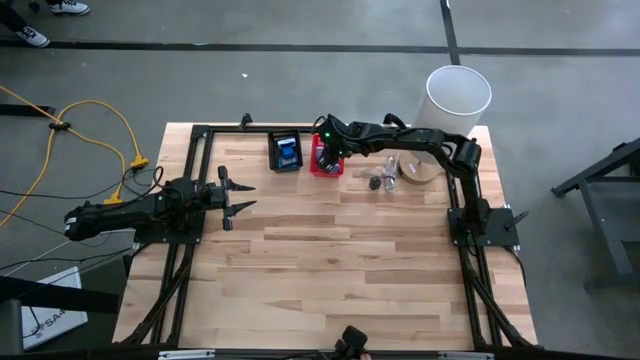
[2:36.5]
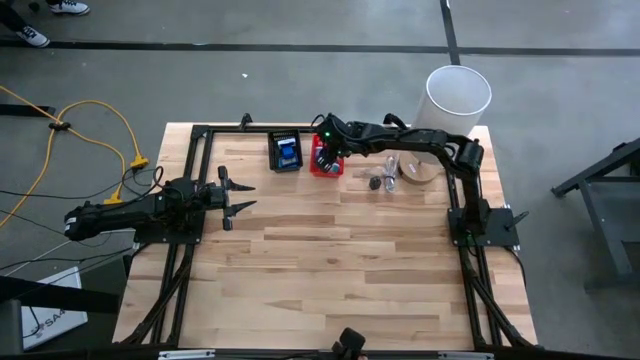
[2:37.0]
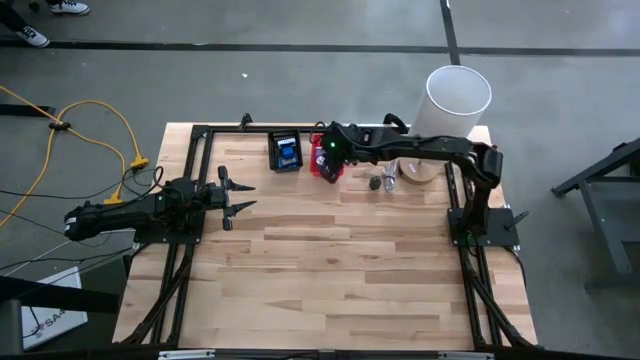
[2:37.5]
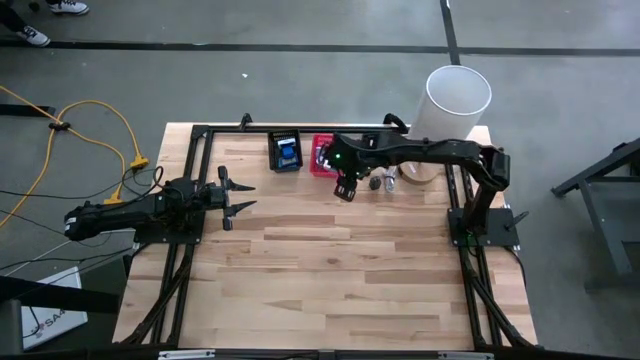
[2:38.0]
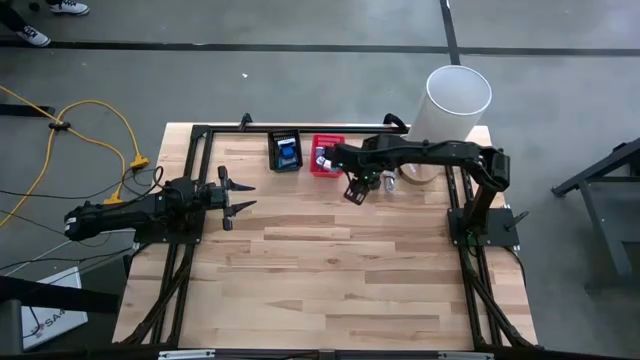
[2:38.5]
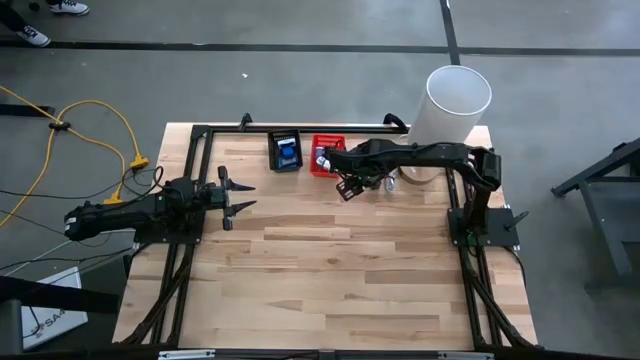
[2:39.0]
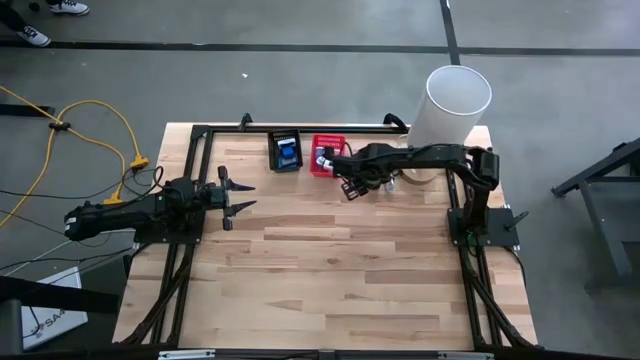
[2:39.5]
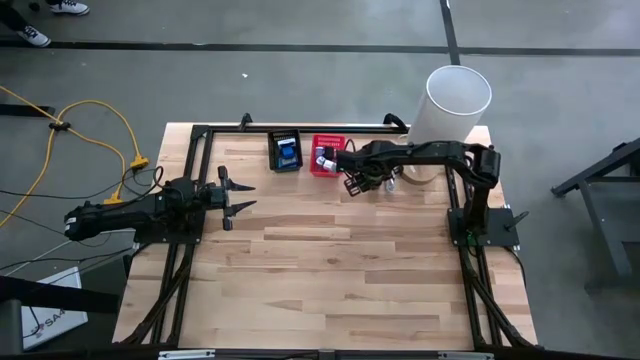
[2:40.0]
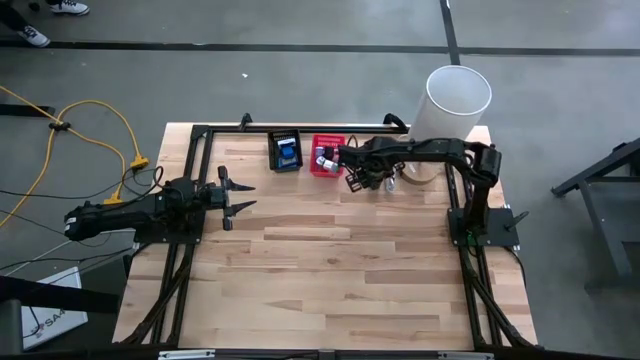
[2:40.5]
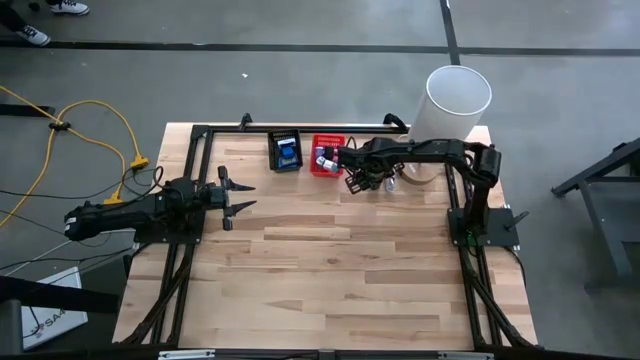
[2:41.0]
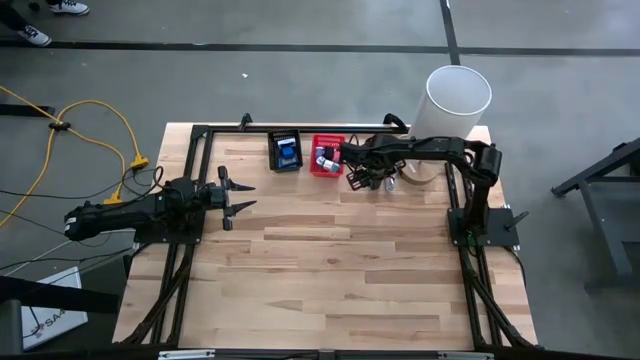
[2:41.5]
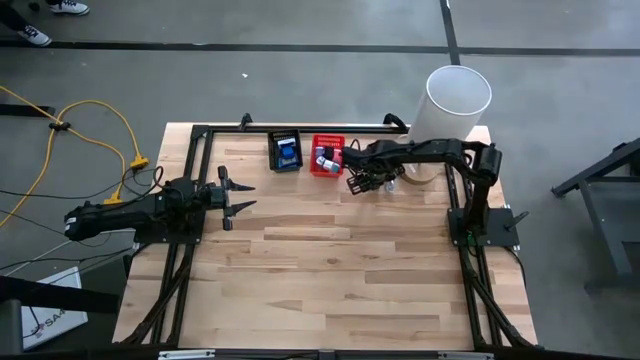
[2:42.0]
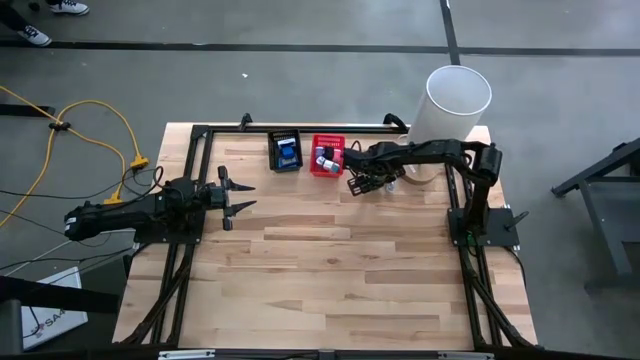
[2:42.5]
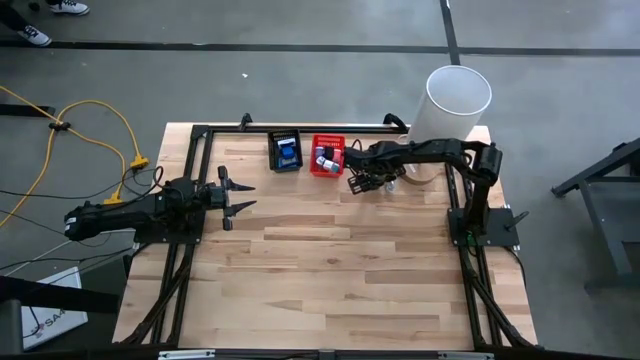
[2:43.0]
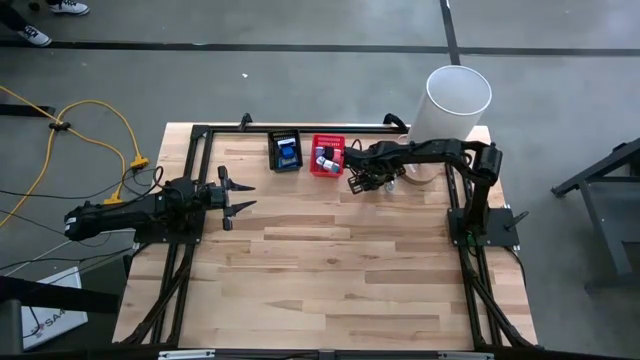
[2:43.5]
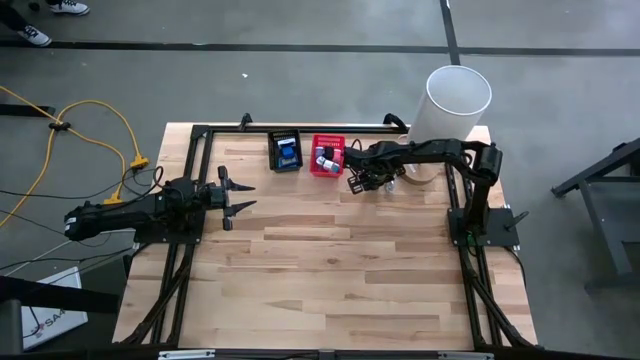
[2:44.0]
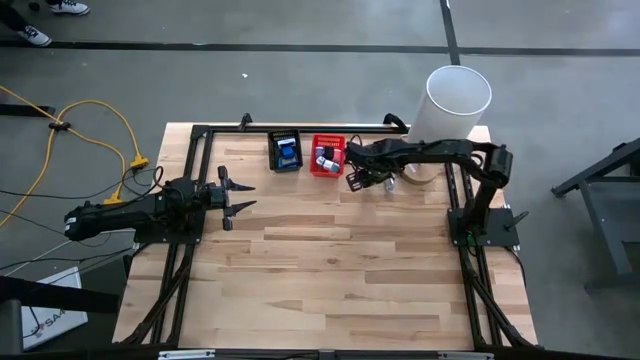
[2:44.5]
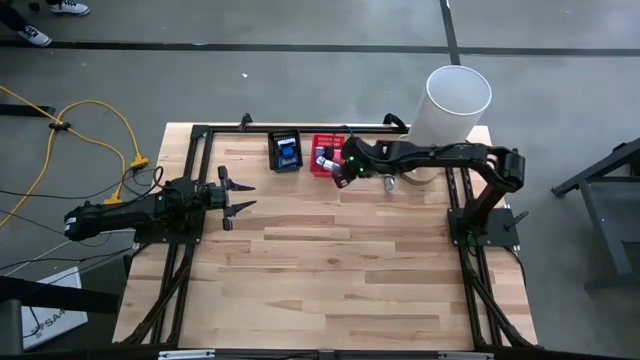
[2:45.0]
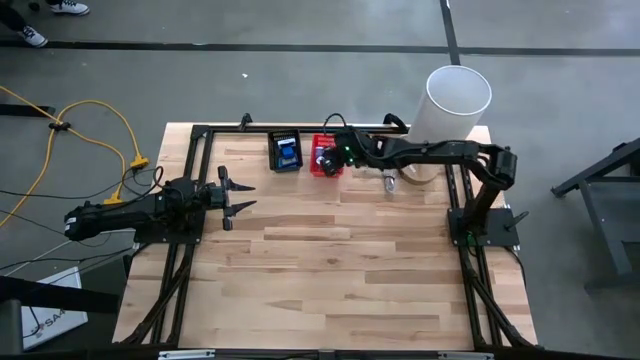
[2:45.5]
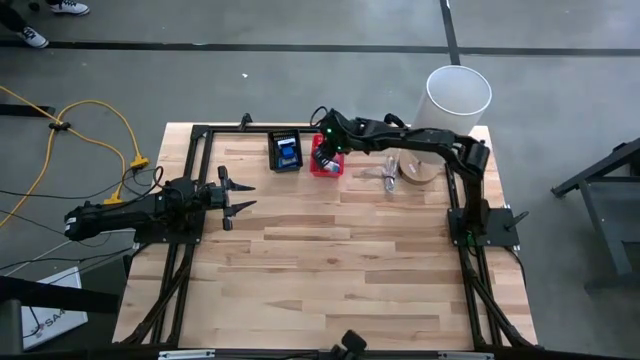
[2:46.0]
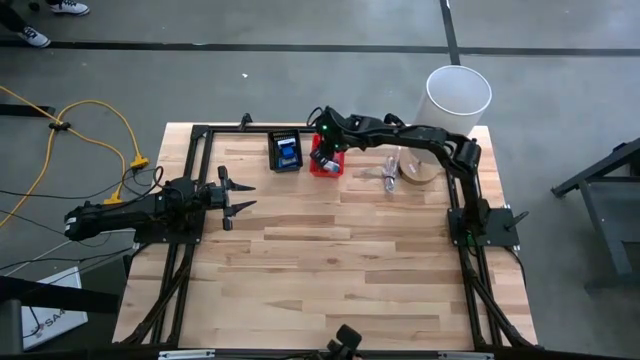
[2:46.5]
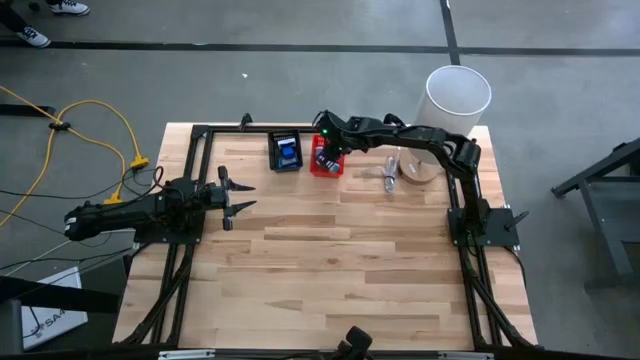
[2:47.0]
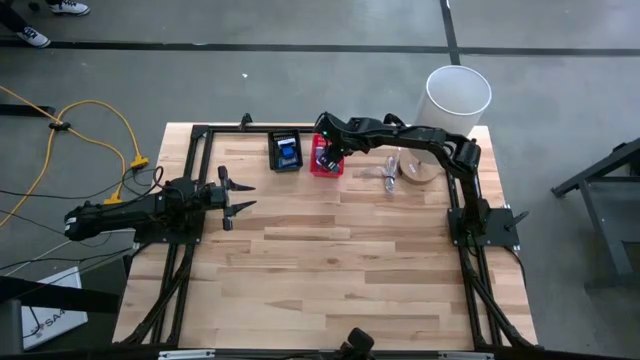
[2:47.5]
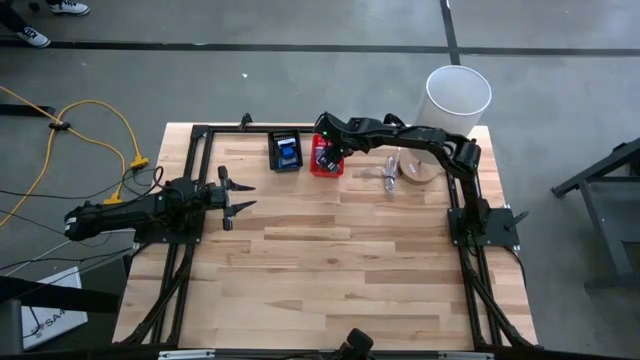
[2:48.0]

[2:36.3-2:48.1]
Task: Pick & Place Office items
Put the black charger adapter into the red basket

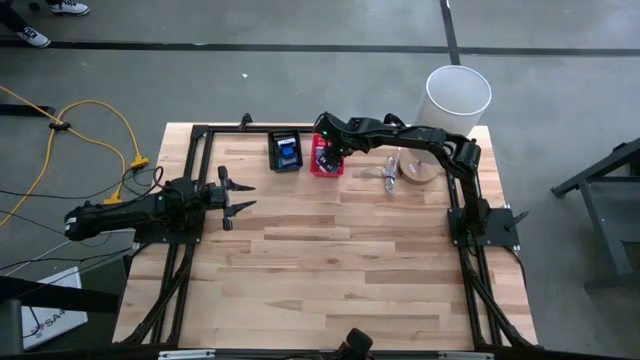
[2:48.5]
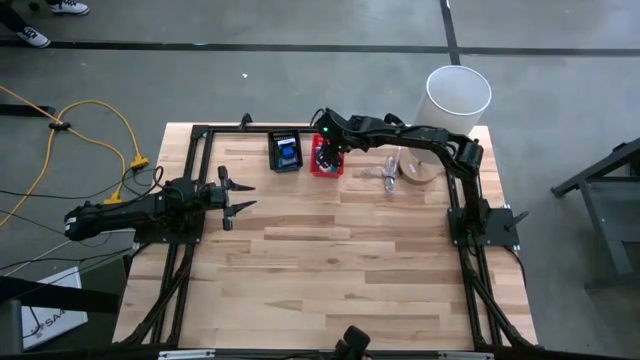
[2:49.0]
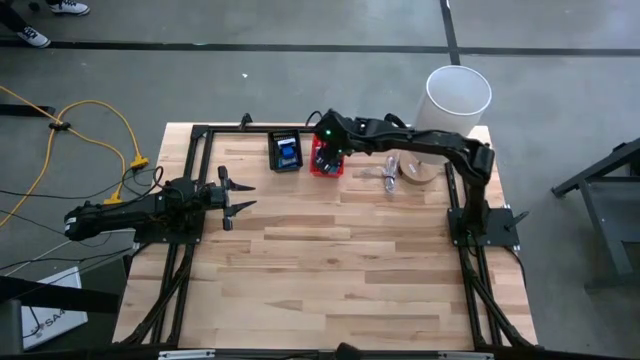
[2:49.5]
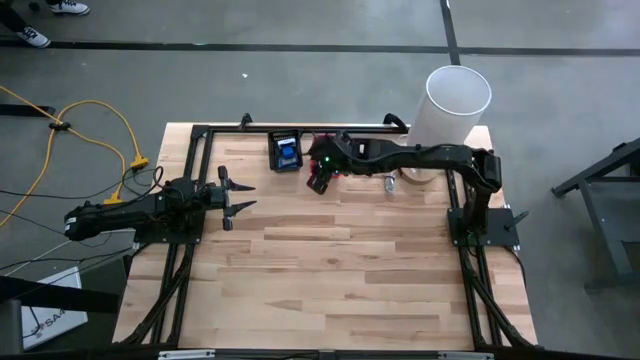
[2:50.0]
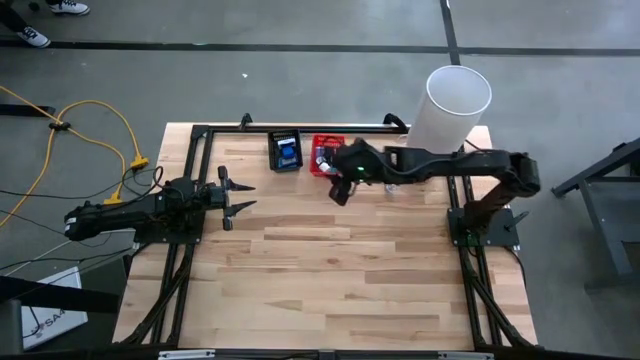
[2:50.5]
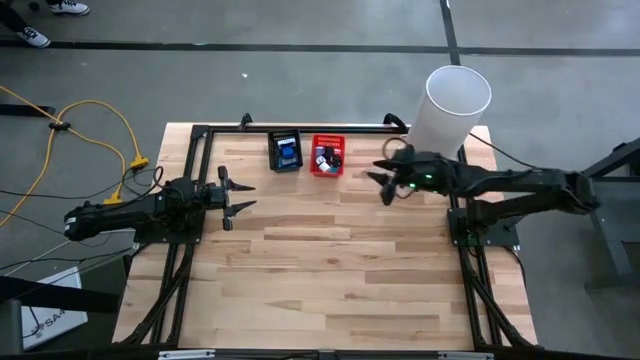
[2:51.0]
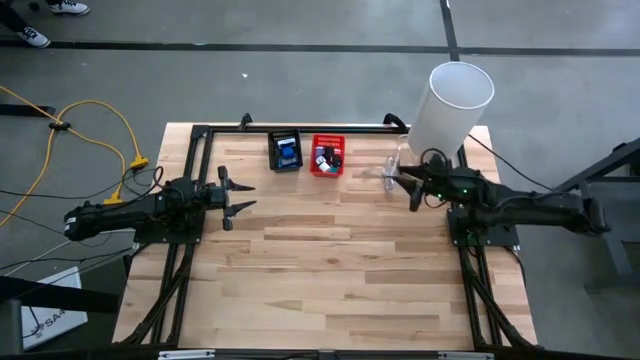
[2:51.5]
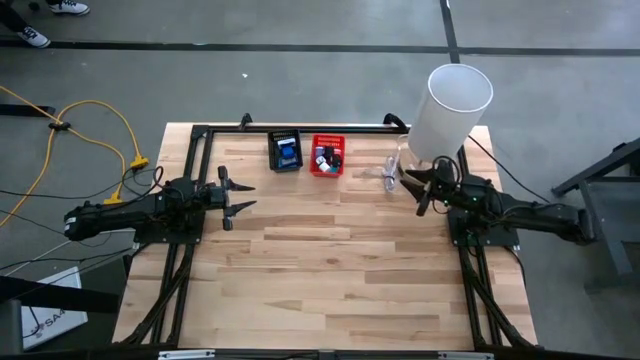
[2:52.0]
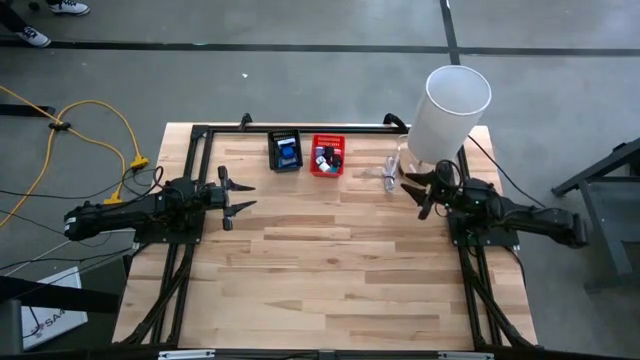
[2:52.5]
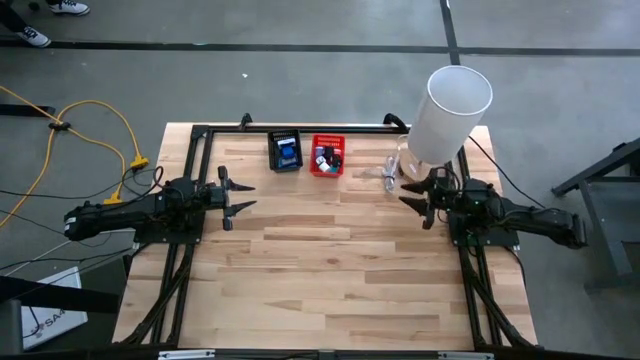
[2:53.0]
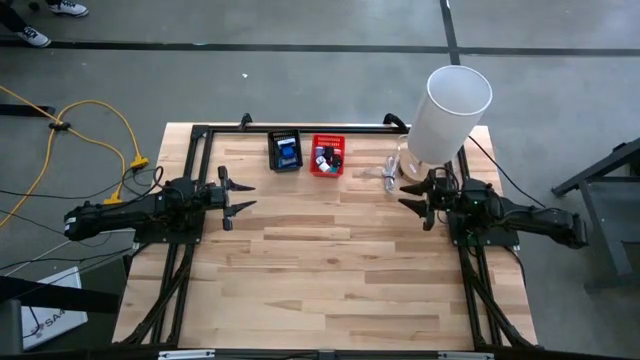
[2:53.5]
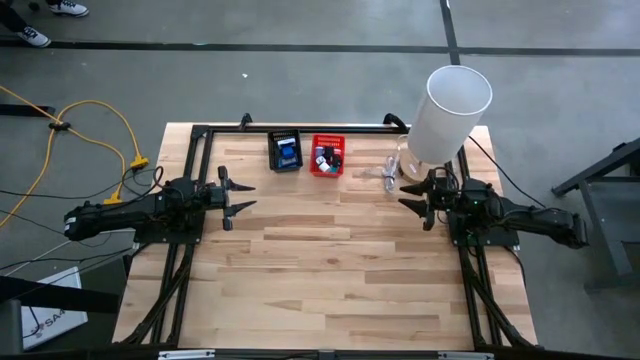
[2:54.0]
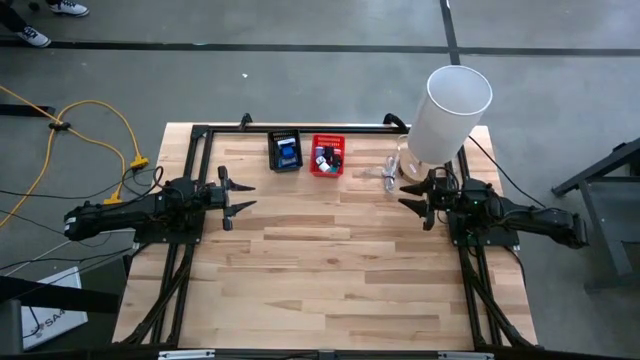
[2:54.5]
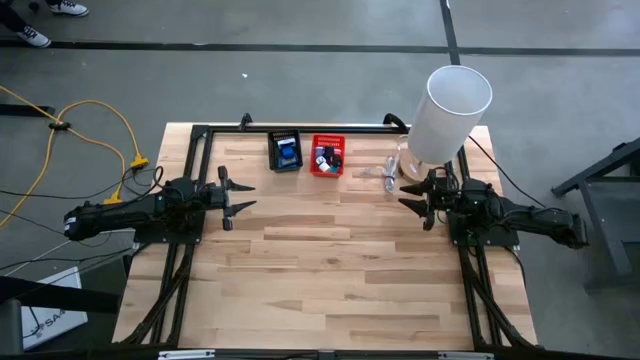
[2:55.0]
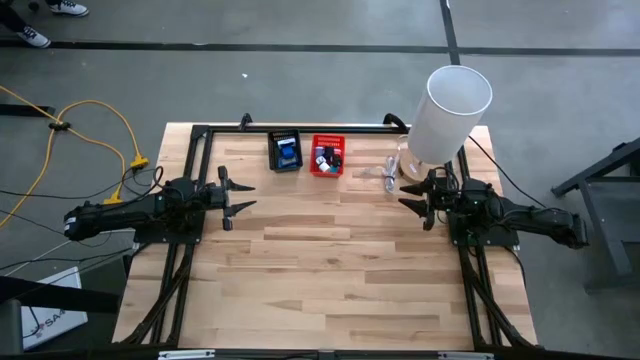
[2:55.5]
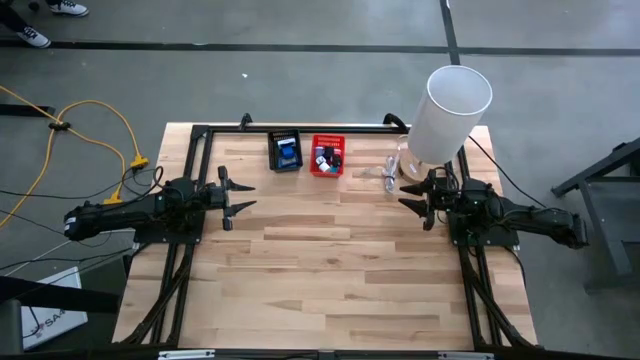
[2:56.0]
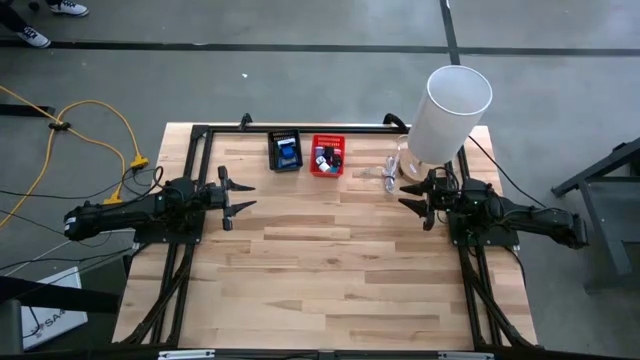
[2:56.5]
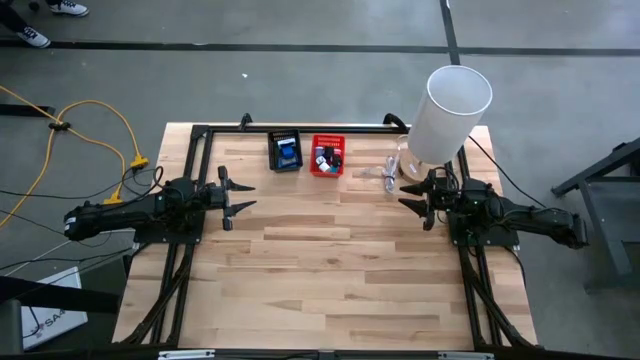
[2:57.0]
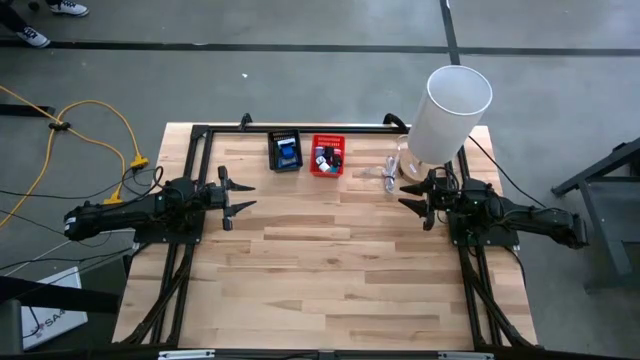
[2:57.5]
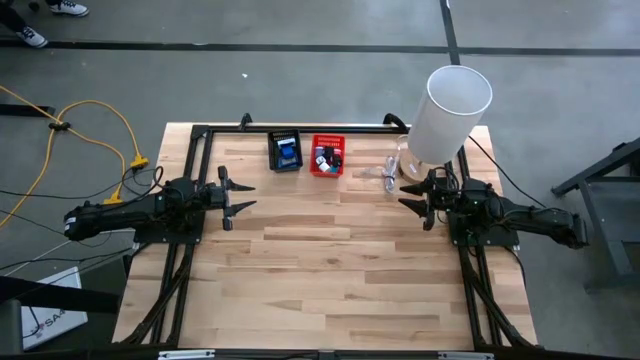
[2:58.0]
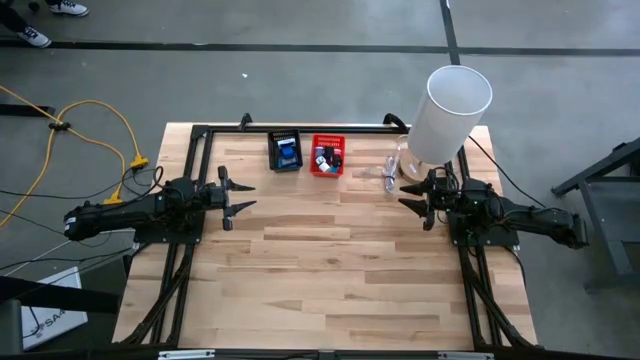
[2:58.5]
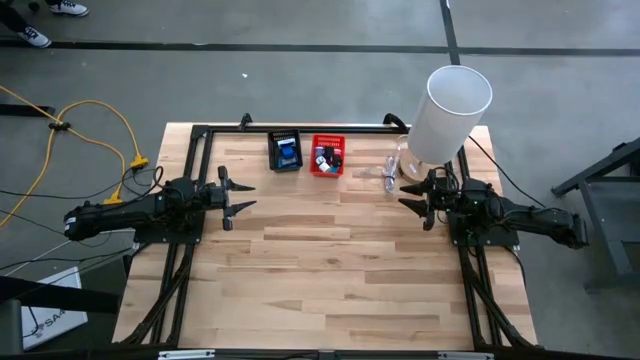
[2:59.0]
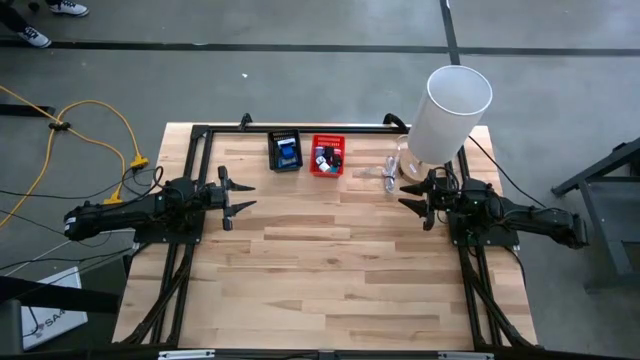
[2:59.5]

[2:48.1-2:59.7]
Return to Home Position
